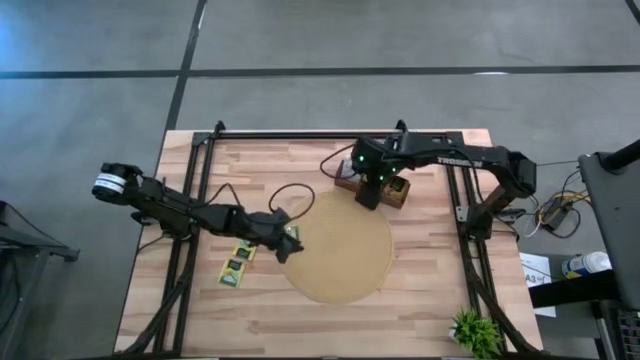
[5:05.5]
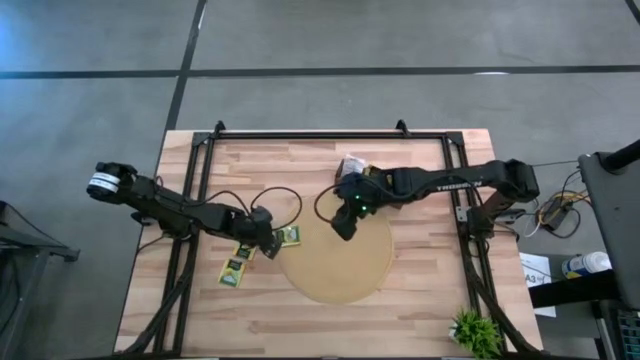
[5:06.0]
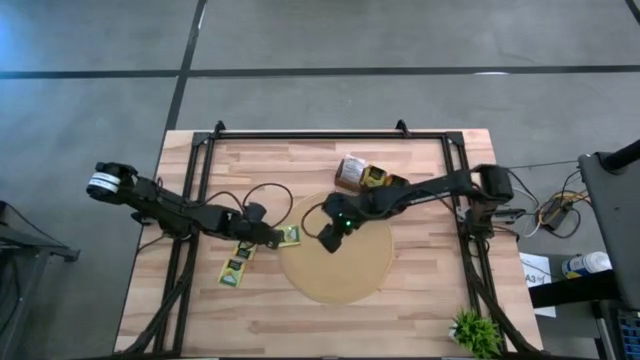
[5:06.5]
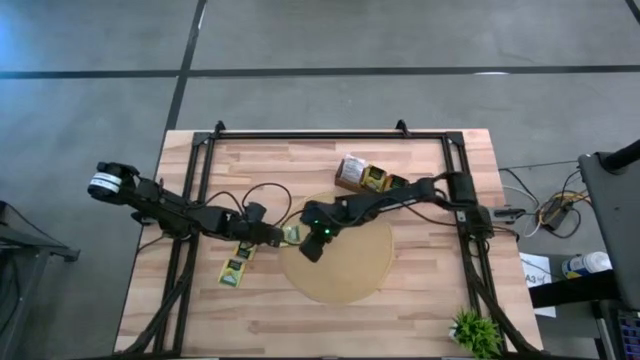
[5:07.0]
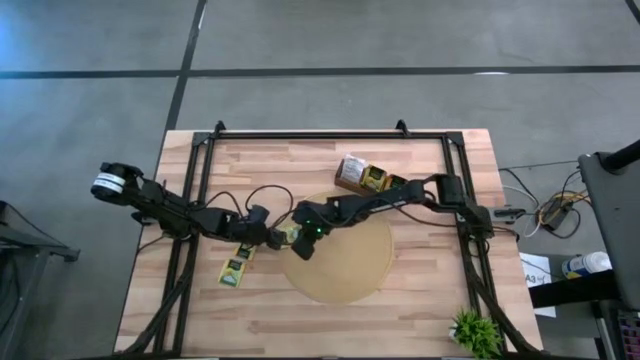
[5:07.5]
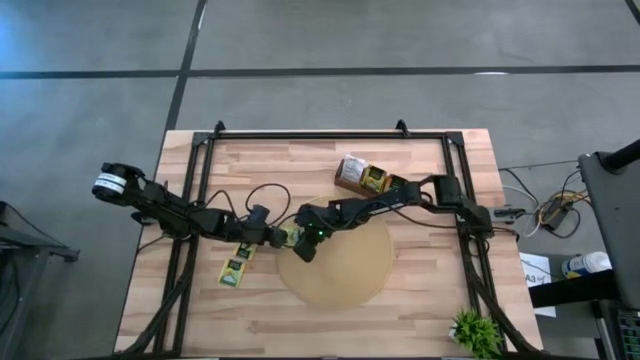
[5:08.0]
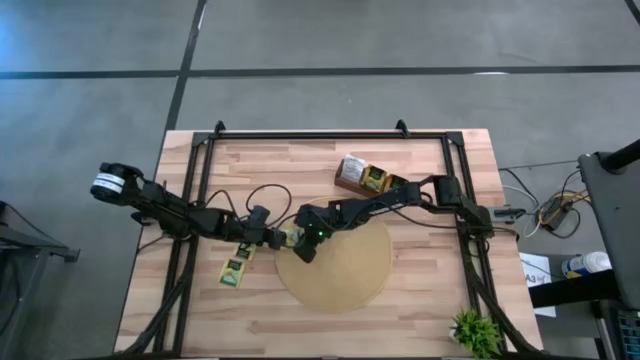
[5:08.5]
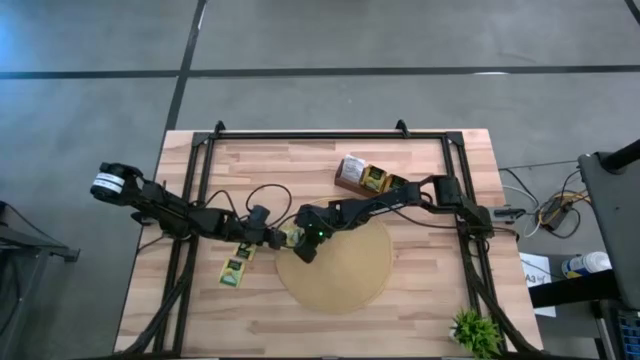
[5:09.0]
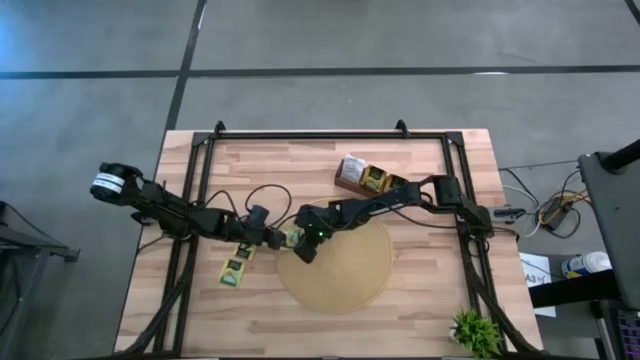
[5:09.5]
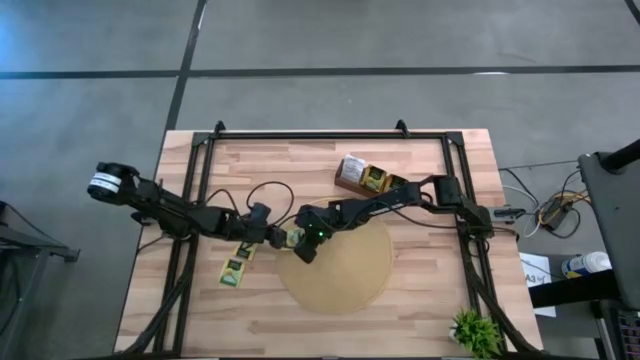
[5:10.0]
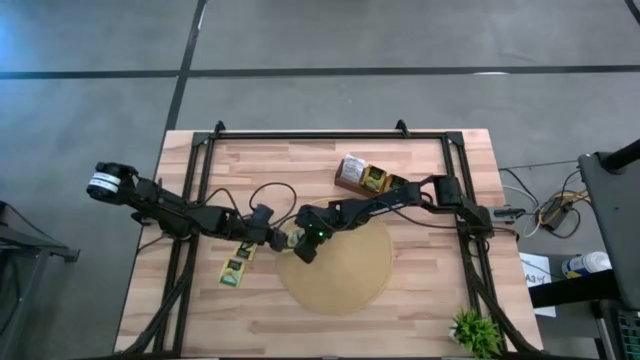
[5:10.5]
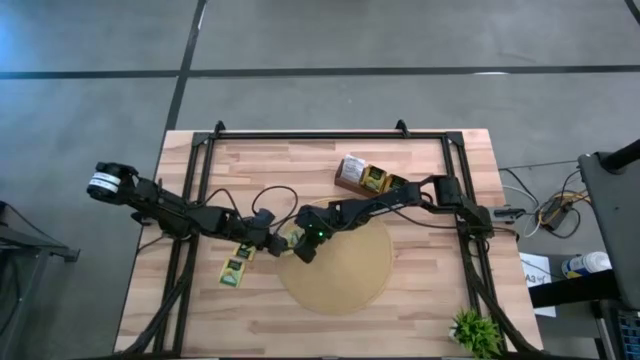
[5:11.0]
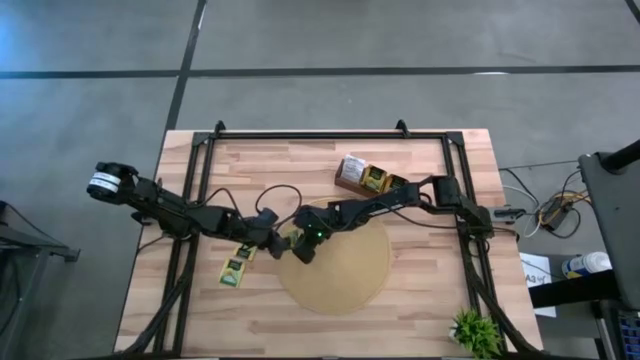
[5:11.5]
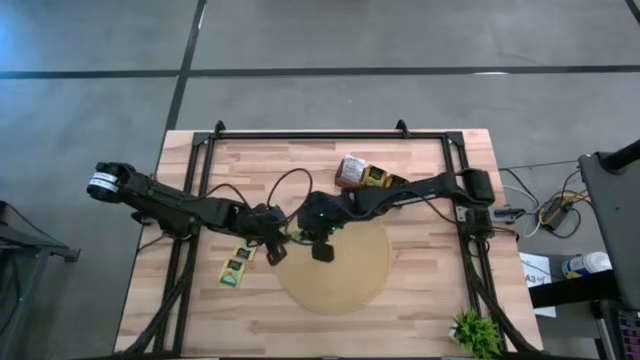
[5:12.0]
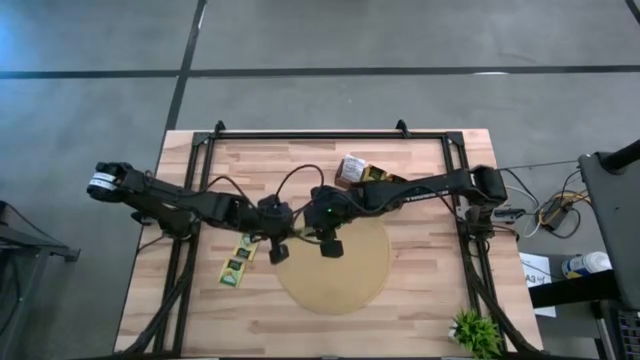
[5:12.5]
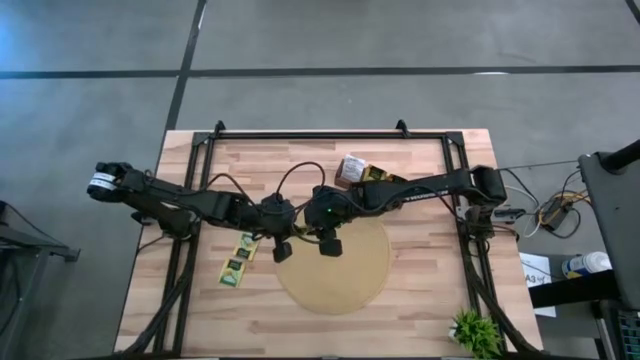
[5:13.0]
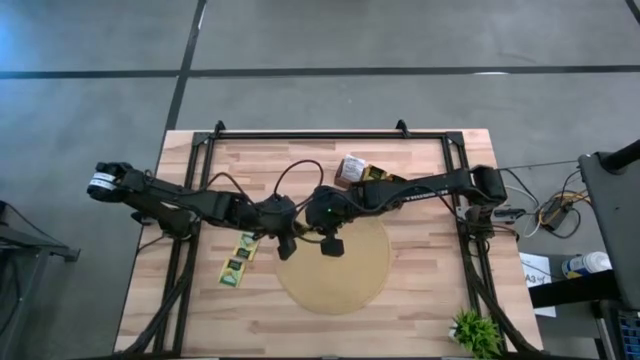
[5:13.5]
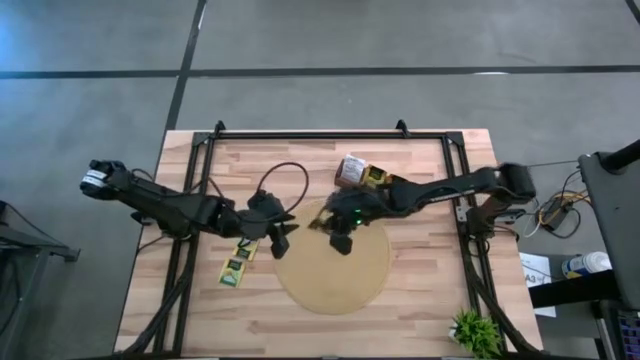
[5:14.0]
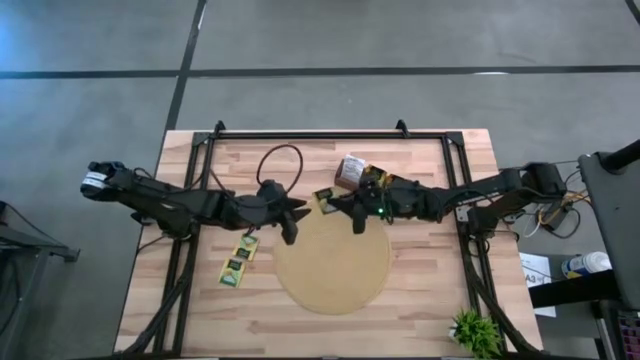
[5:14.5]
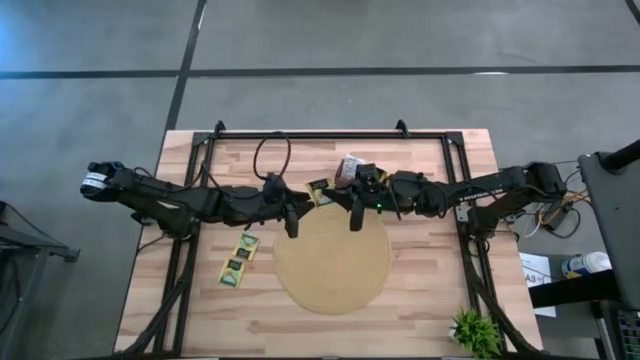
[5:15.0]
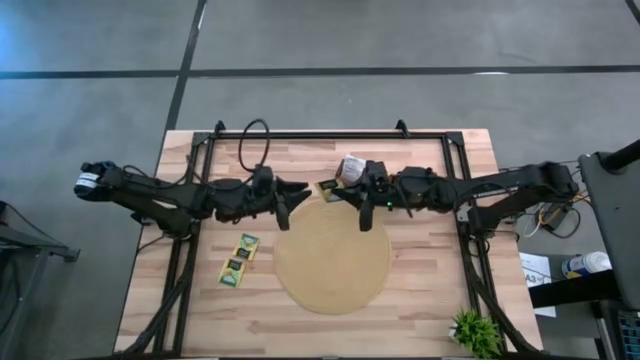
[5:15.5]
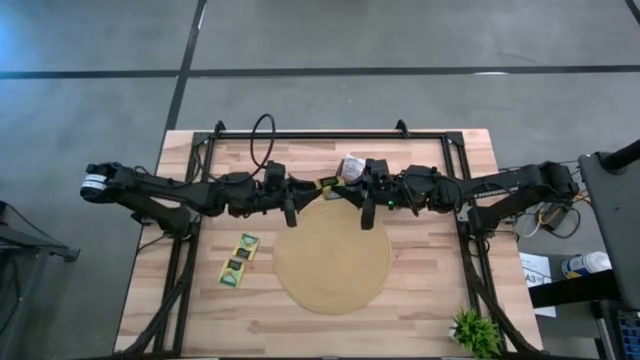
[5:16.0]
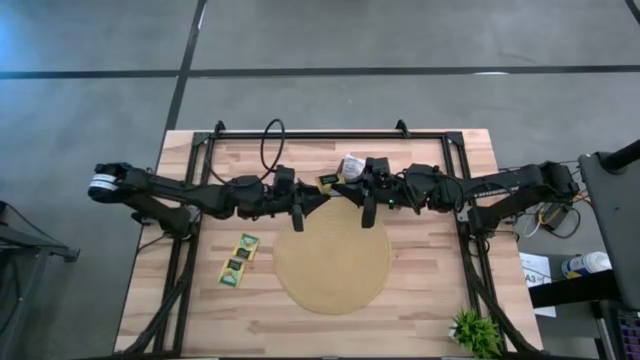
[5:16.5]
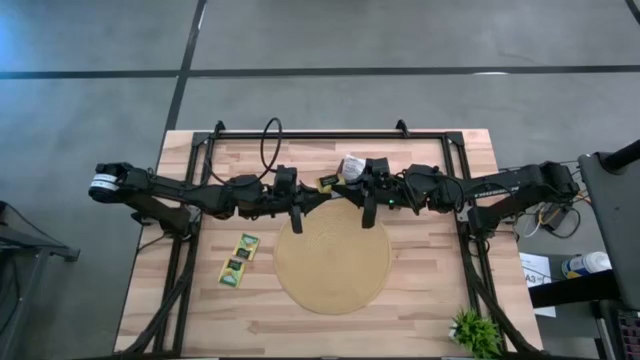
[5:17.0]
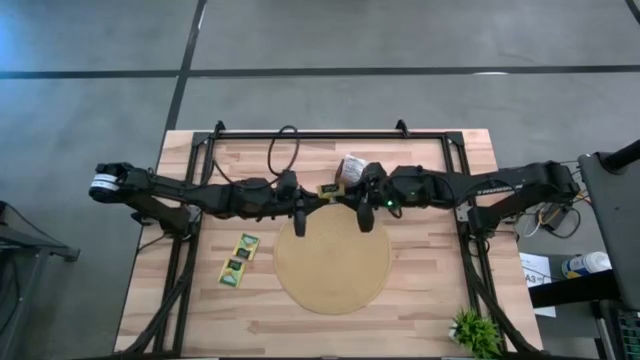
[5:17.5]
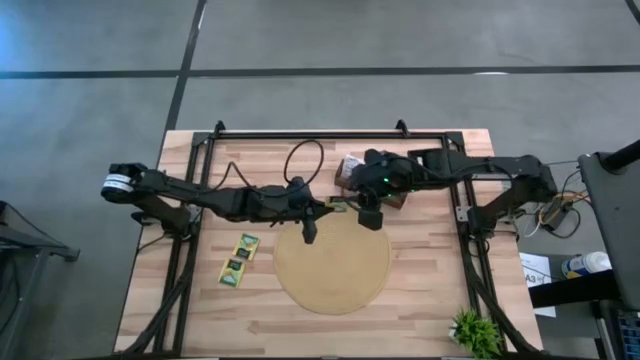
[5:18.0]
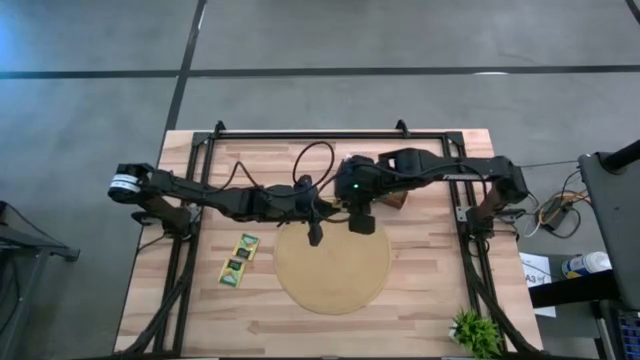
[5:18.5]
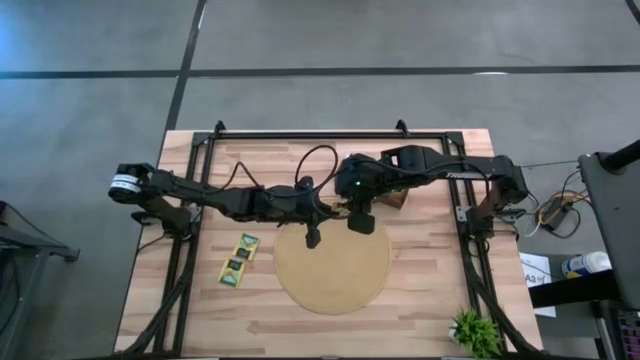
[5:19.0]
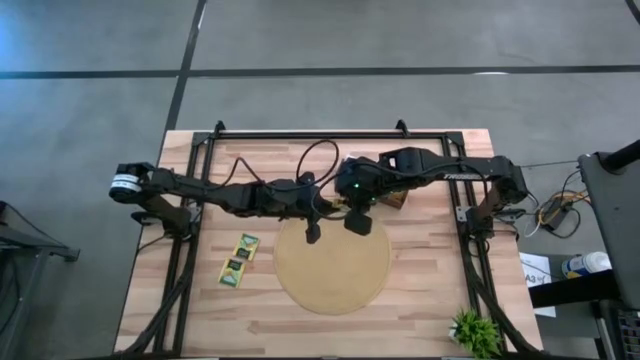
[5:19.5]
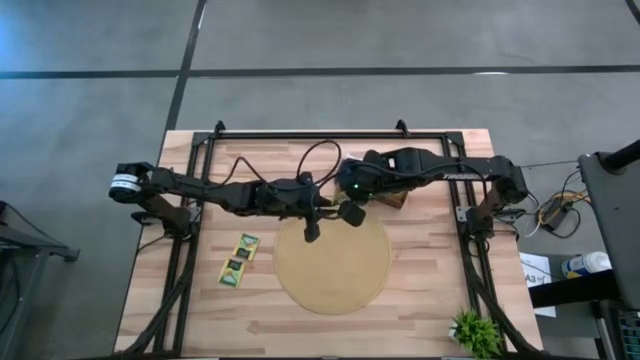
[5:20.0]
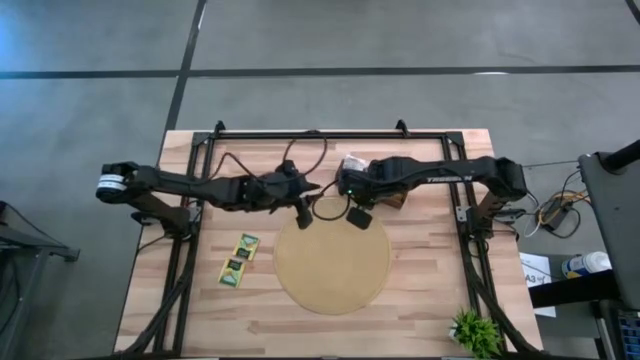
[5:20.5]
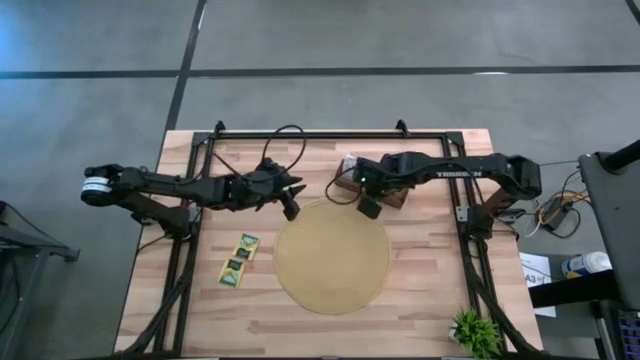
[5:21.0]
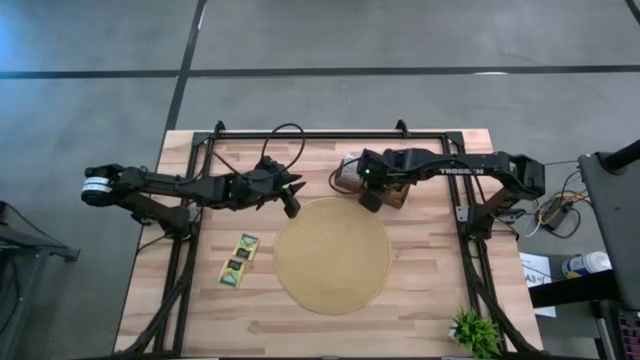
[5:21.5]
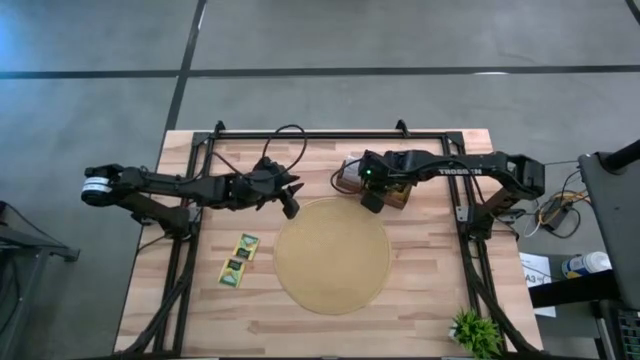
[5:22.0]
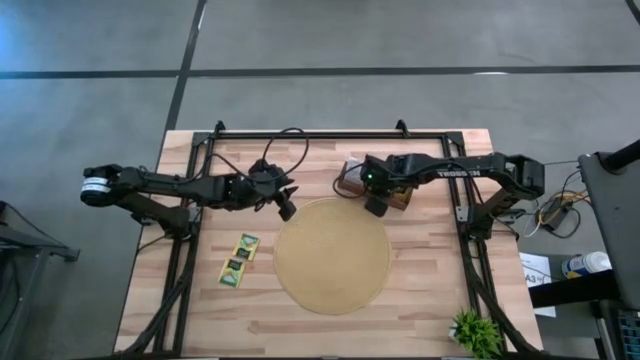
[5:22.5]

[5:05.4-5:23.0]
Task: Pick & Place Tea
Put the lemon tea bag into the middle section of the wooden organizer
